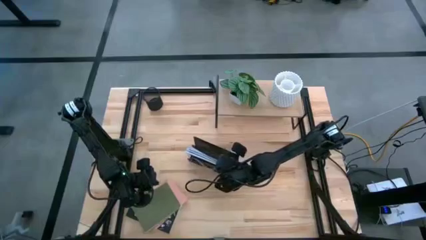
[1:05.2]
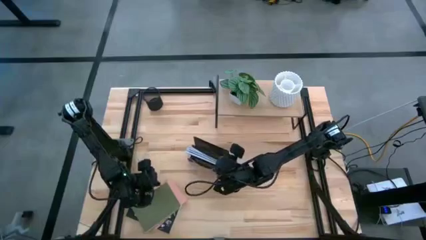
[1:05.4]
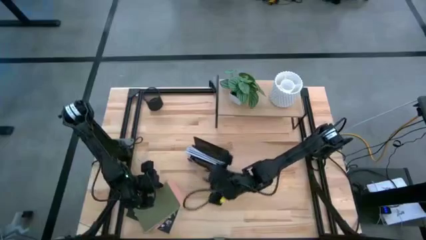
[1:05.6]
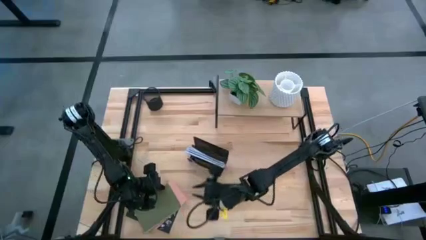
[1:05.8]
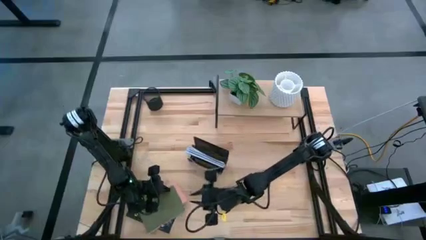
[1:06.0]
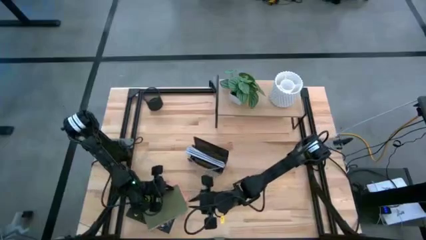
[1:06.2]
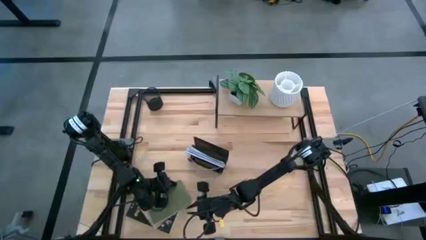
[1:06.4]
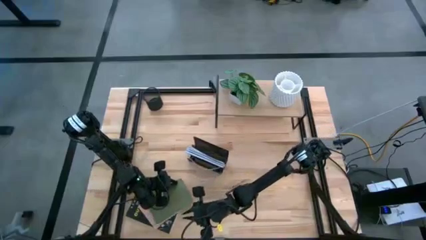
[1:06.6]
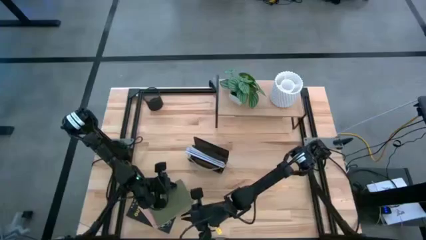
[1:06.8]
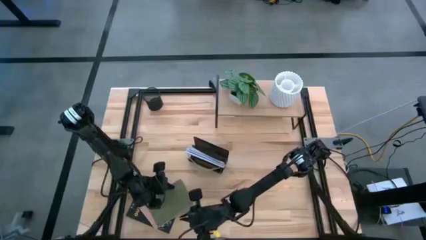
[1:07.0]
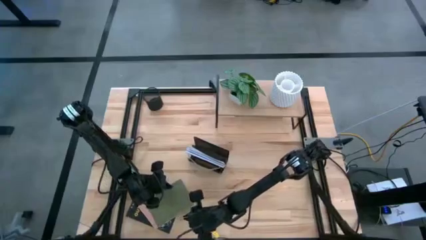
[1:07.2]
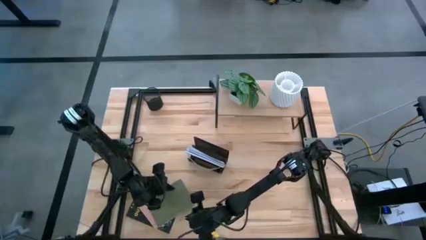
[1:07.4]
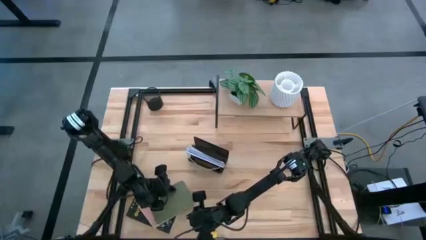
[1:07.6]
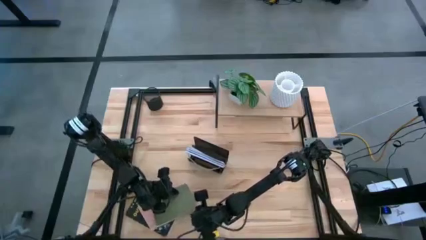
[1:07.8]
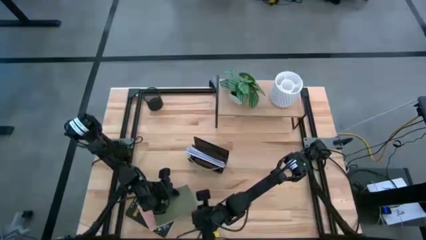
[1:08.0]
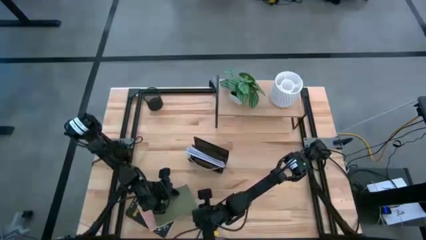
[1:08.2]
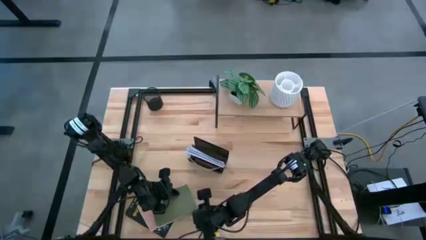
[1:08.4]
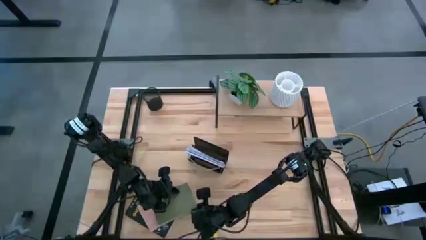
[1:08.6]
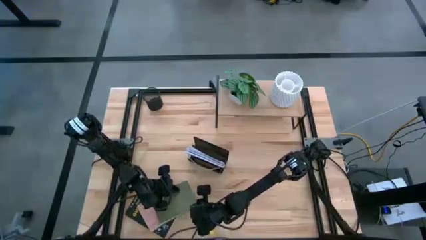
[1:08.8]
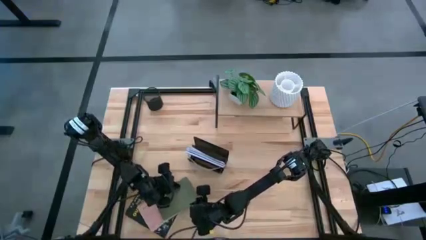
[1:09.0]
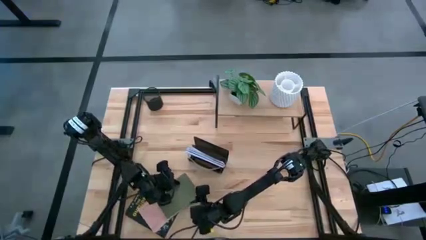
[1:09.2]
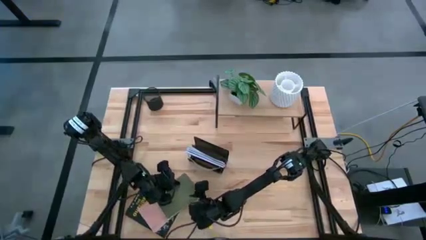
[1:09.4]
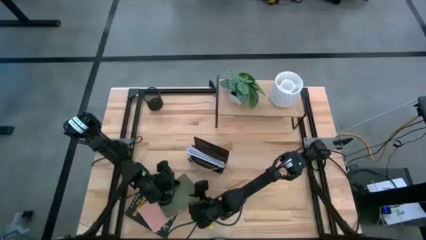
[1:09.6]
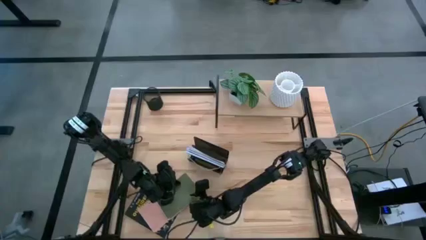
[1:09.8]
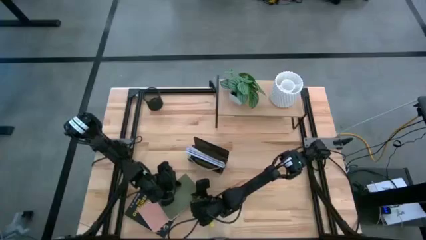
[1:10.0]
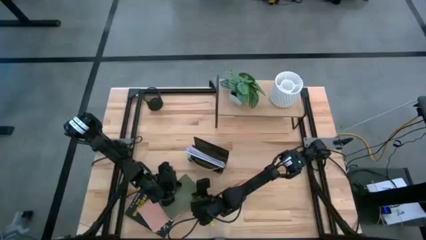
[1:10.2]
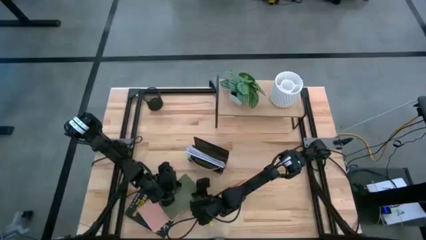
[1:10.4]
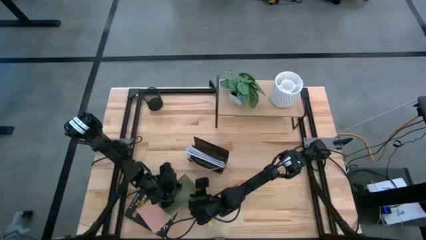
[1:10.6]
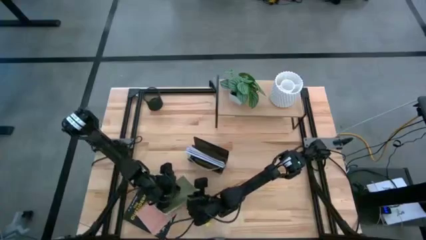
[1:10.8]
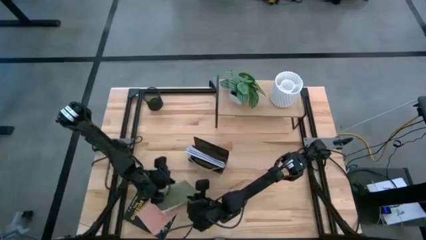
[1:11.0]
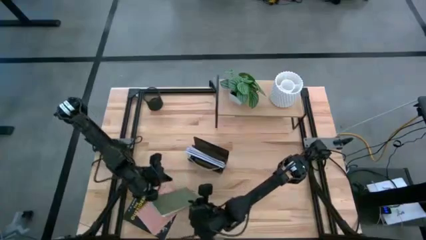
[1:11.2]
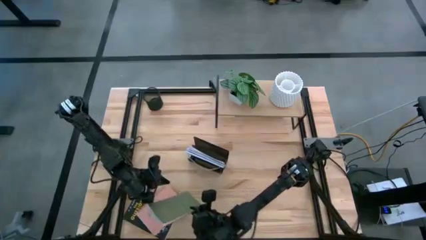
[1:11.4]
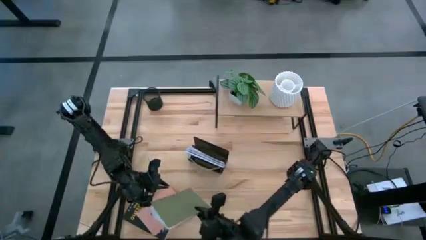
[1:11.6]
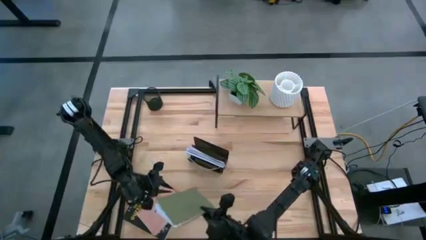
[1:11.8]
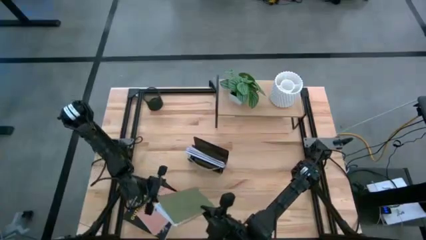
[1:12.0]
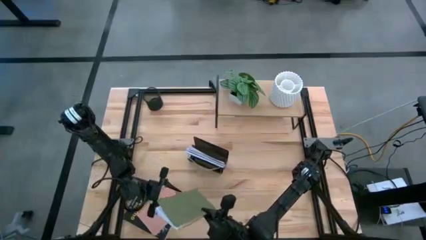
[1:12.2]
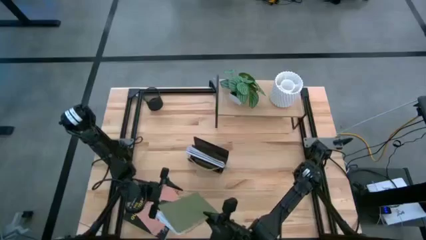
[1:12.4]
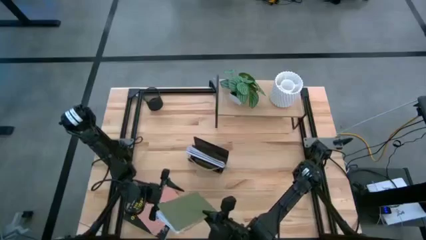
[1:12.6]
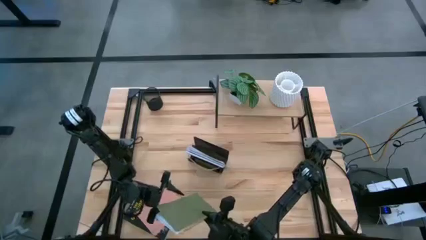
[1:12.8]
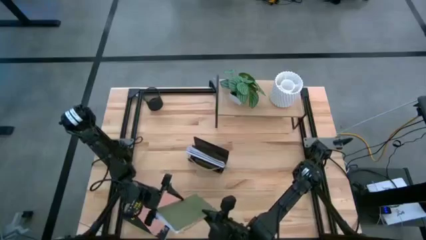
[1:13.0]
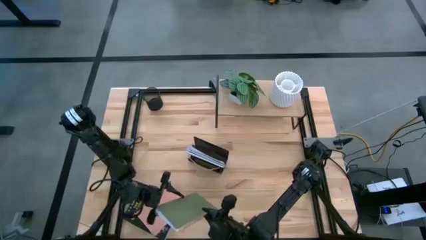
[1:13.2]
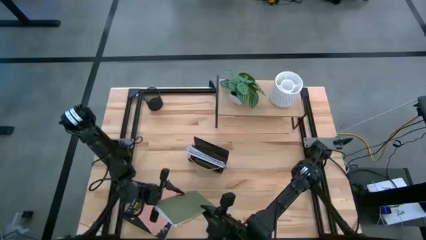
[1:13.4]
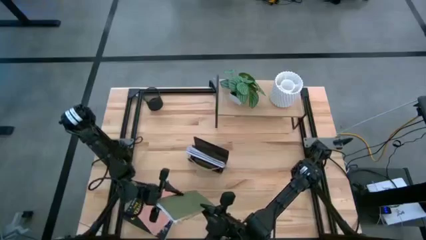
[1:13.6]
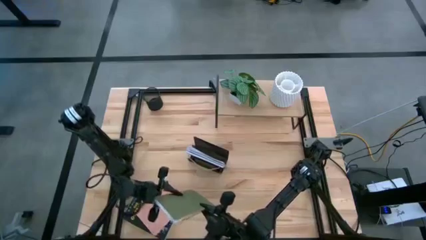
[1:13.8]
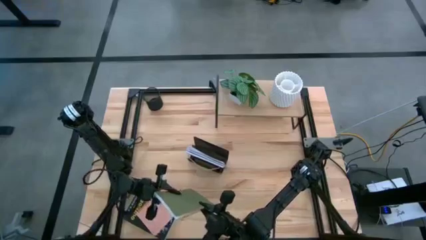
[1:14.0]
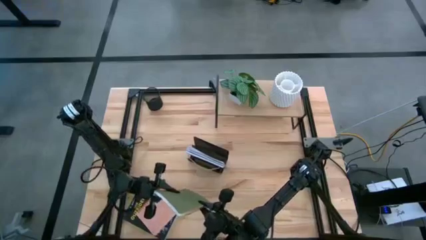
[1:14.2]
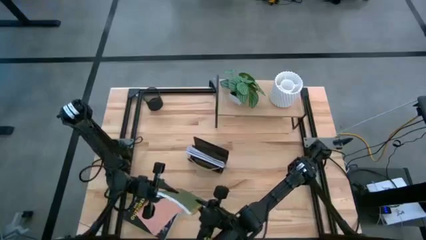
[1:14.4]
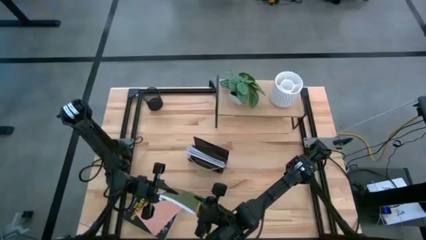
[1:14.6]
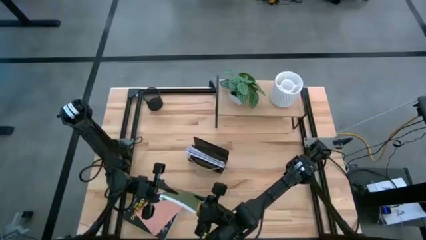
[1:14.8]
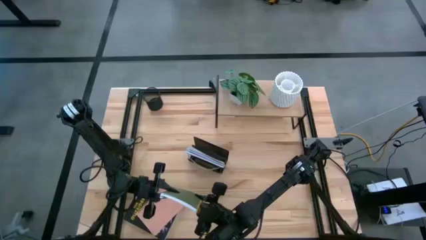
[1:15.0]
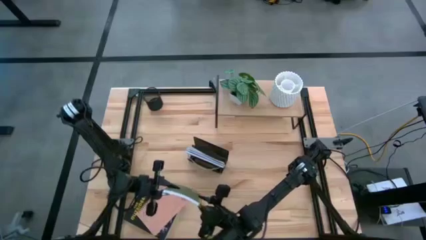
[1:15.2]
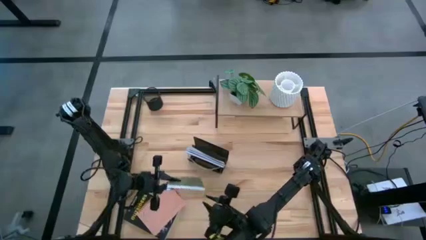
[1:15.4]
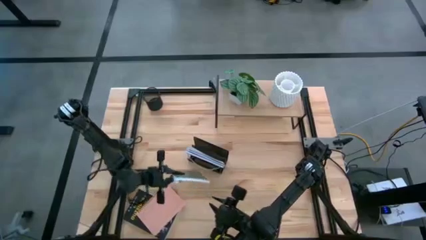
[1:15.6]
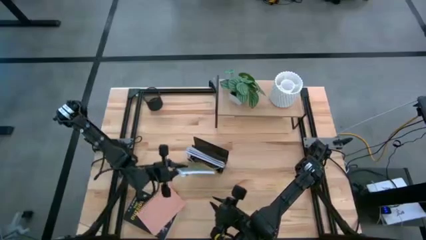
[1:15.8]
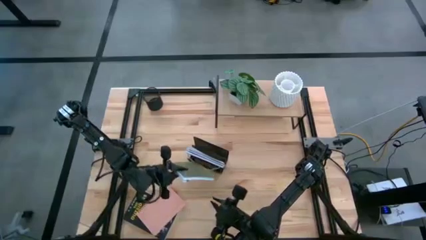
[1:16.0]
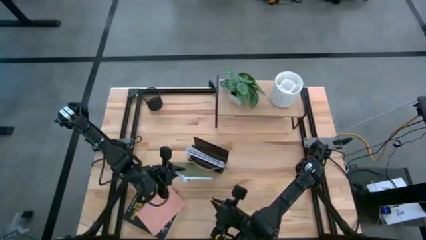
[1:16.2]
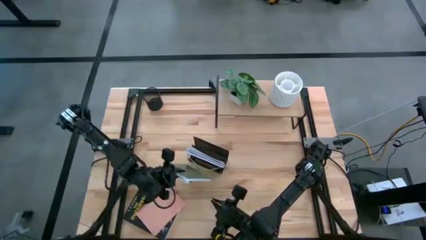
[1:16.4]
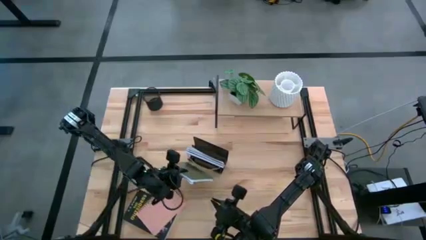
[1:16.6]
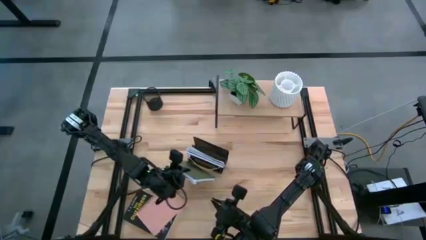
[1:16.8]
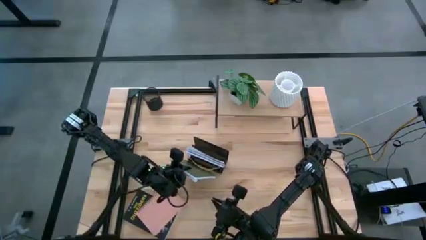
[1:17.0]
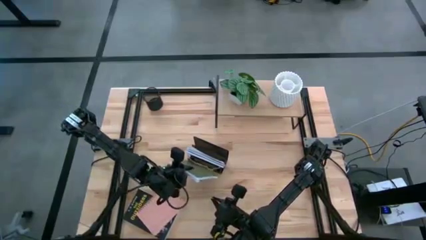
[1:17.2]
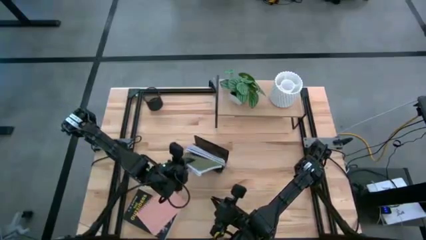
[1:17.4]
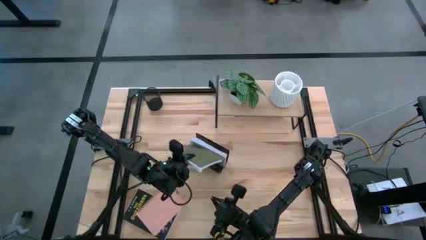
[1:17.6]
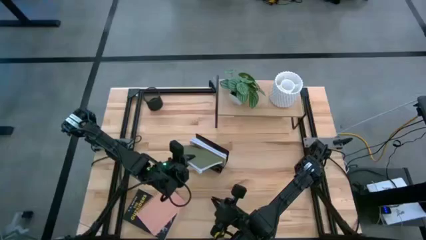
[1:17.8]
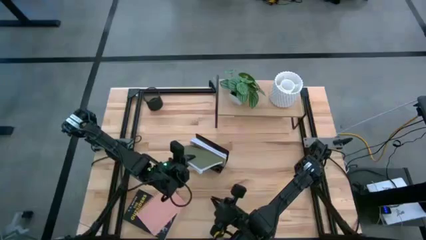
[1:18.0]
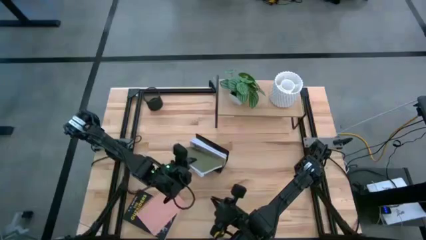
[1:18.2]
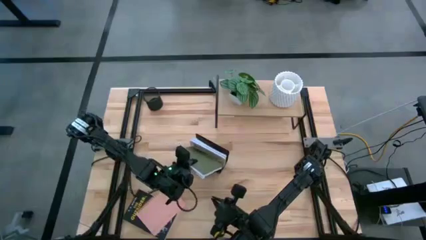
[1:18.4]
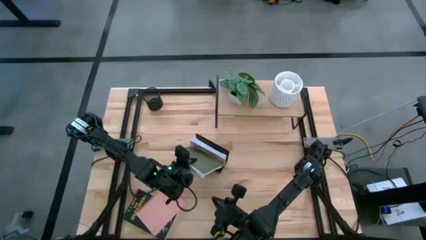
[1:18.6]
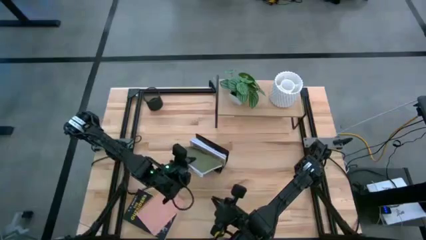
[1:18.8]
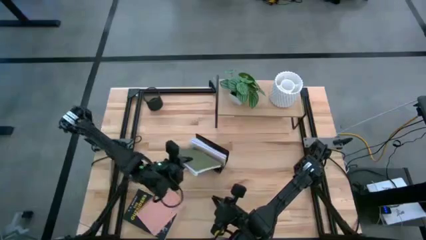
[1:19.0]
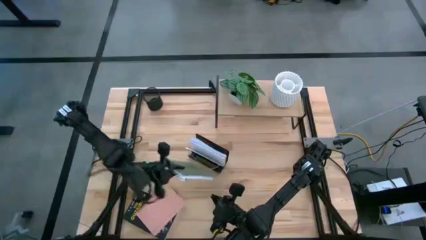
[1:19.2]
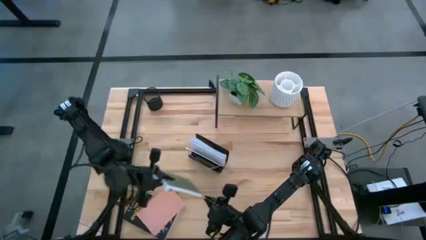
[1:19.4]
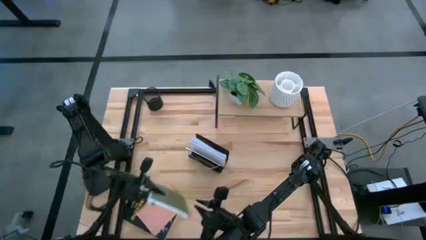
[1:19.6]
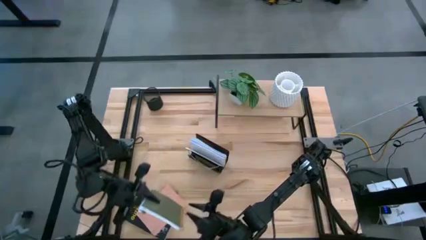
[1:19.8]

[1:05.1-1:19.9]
Task: Stock shelves
Put the green notebook into the black mesh bookshelf
